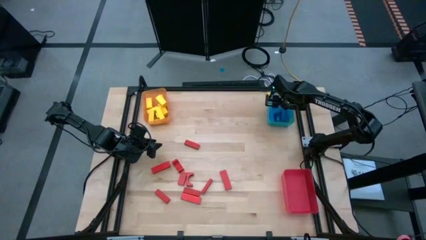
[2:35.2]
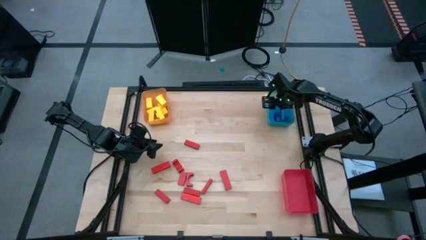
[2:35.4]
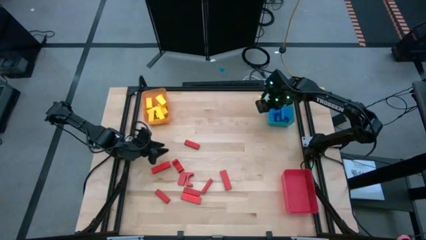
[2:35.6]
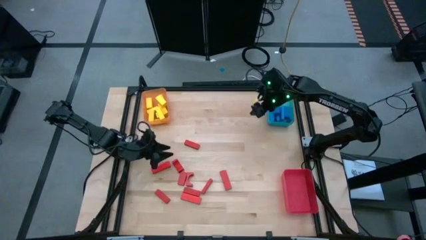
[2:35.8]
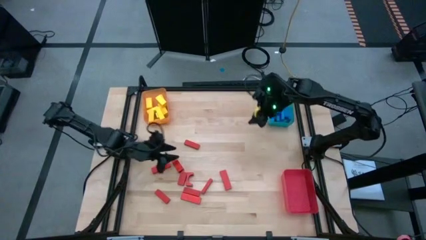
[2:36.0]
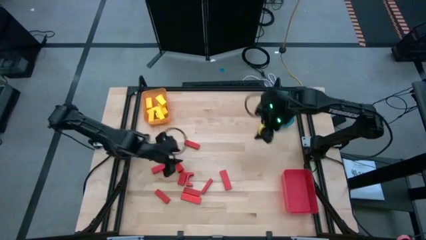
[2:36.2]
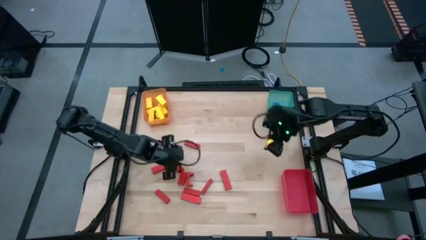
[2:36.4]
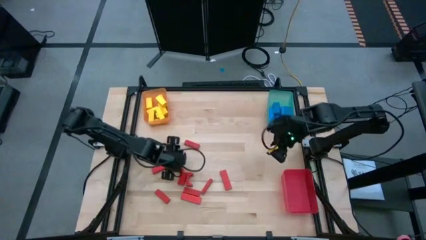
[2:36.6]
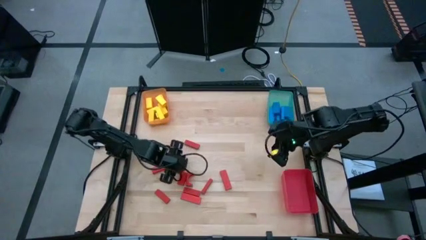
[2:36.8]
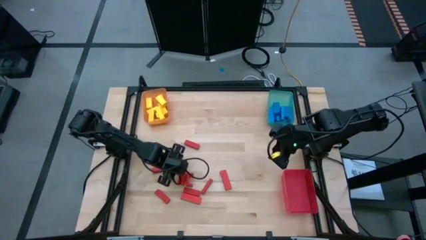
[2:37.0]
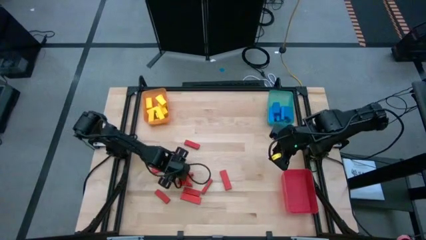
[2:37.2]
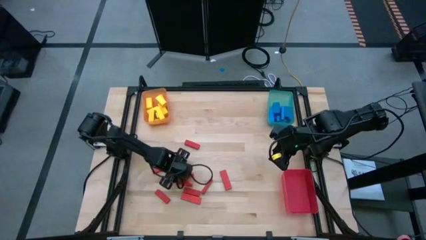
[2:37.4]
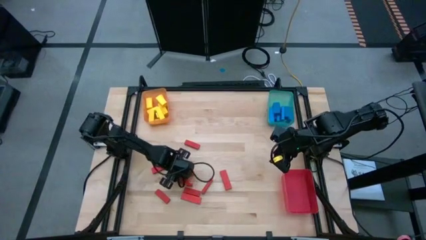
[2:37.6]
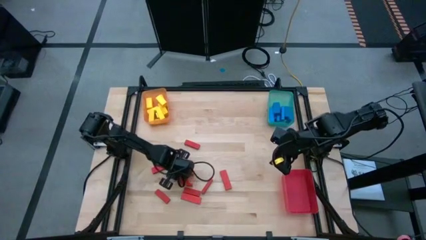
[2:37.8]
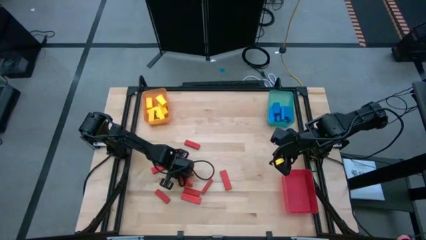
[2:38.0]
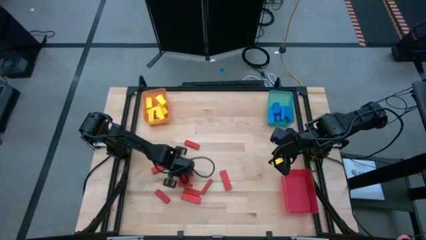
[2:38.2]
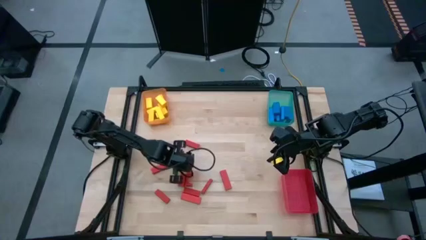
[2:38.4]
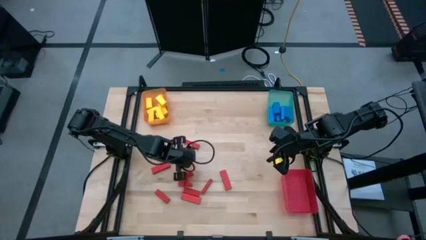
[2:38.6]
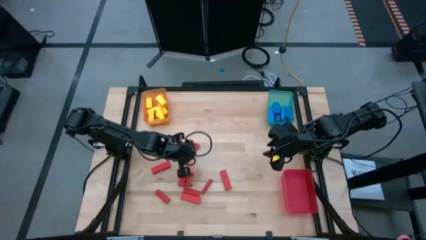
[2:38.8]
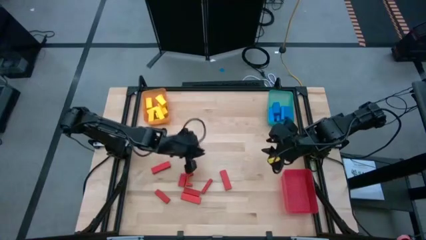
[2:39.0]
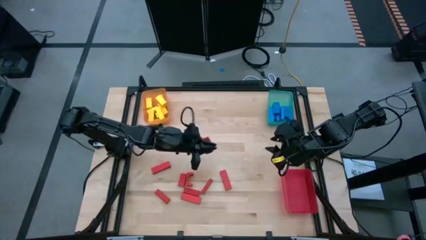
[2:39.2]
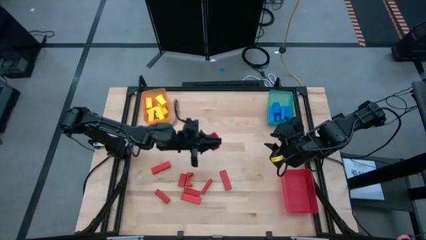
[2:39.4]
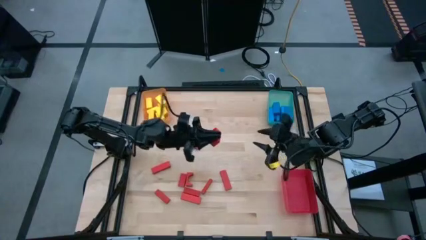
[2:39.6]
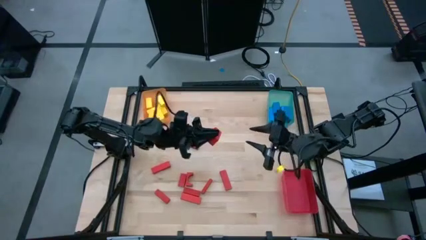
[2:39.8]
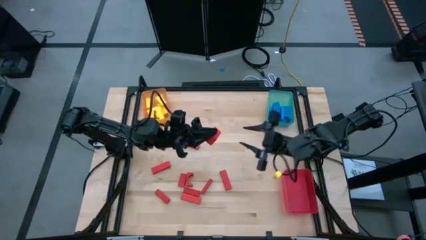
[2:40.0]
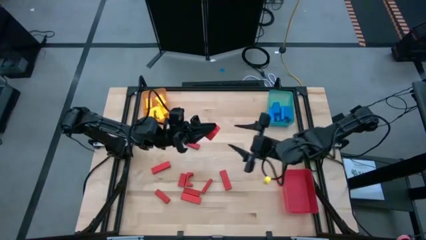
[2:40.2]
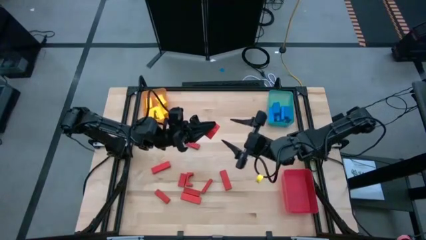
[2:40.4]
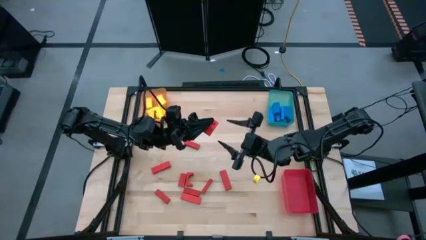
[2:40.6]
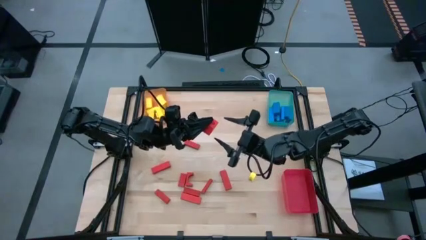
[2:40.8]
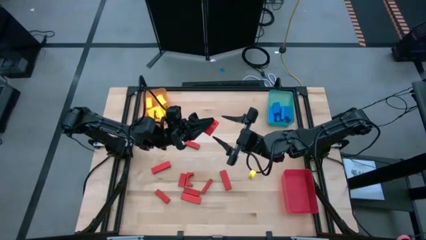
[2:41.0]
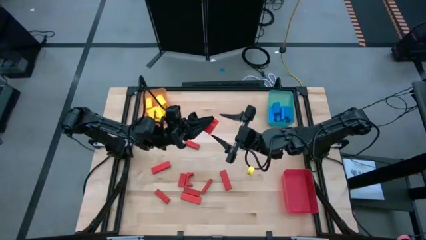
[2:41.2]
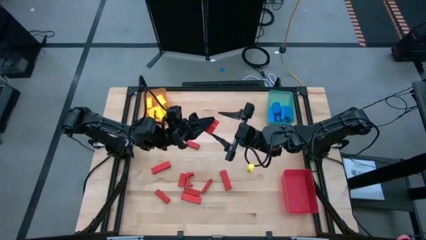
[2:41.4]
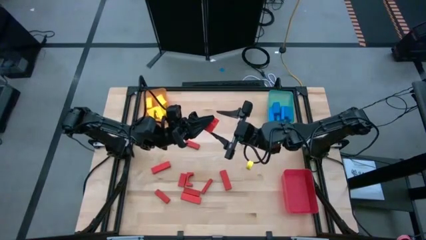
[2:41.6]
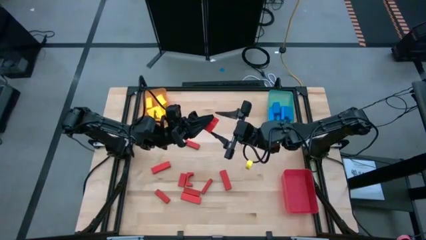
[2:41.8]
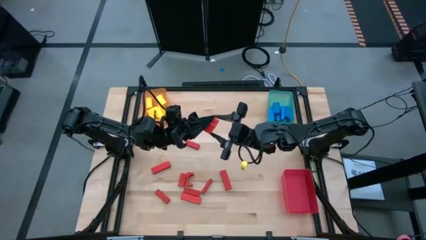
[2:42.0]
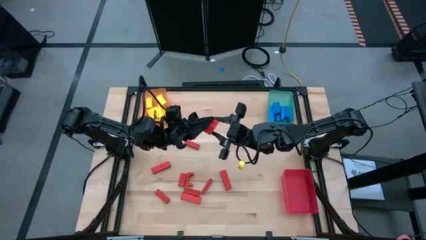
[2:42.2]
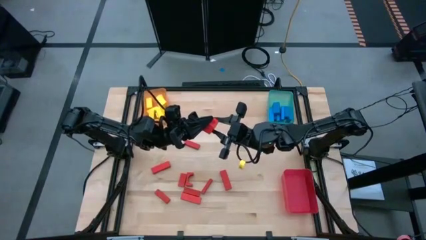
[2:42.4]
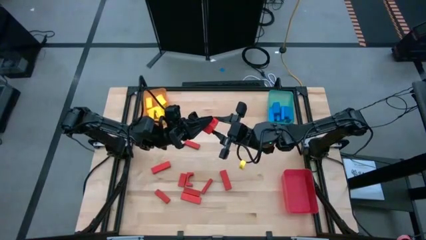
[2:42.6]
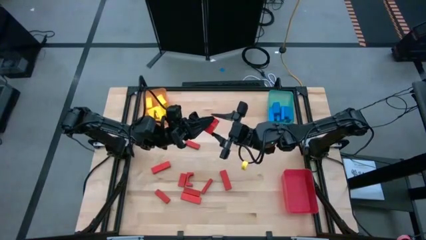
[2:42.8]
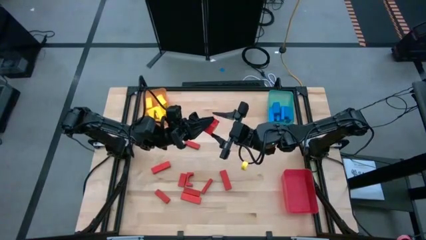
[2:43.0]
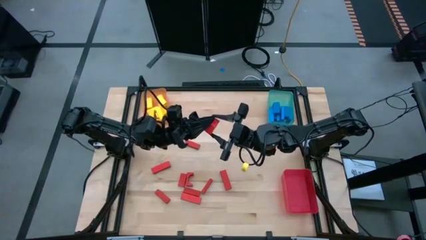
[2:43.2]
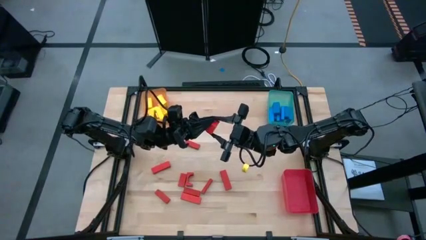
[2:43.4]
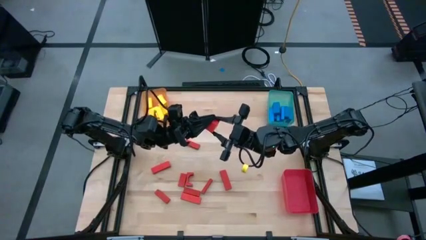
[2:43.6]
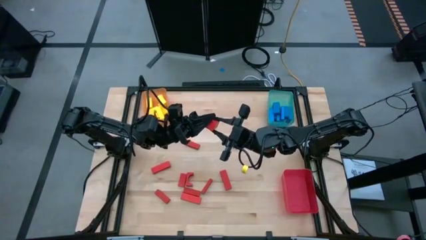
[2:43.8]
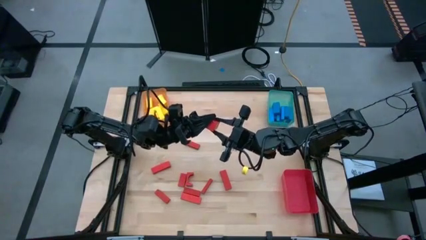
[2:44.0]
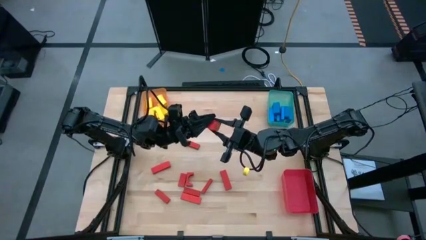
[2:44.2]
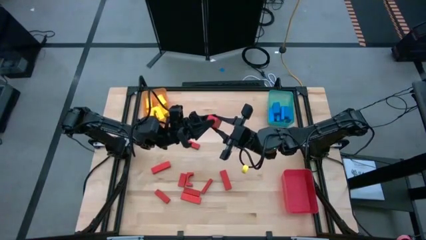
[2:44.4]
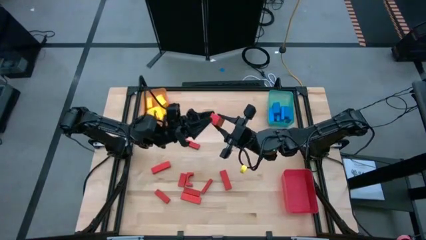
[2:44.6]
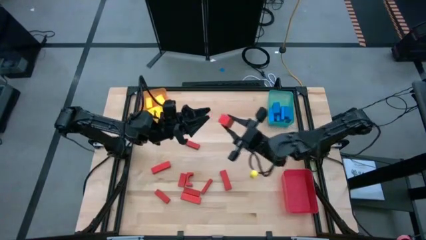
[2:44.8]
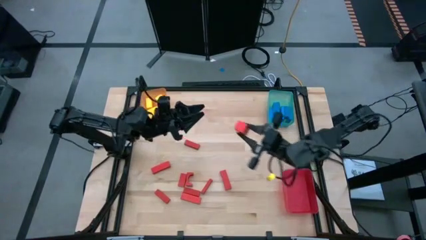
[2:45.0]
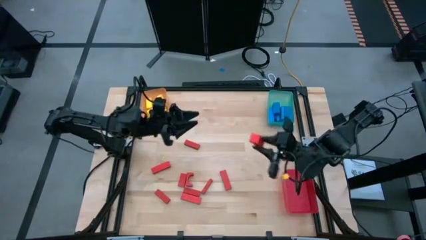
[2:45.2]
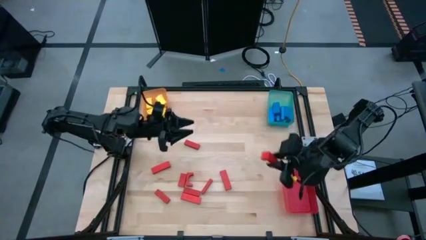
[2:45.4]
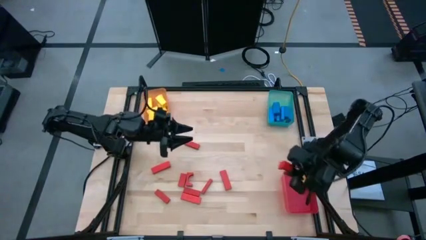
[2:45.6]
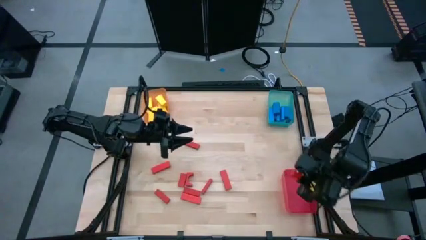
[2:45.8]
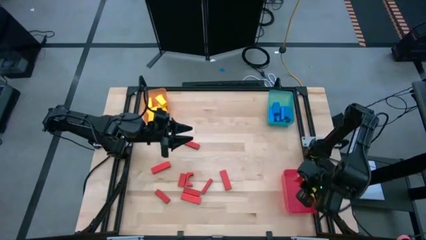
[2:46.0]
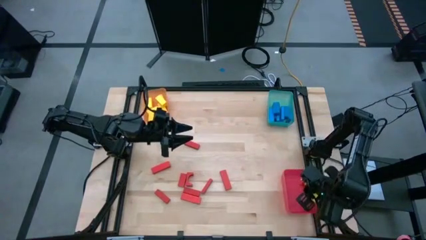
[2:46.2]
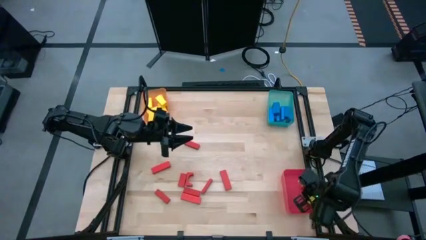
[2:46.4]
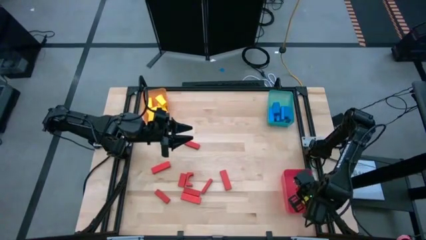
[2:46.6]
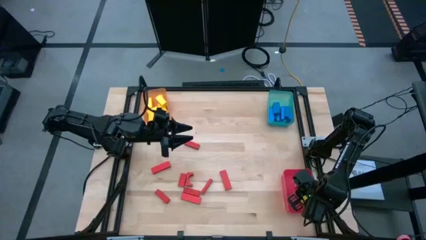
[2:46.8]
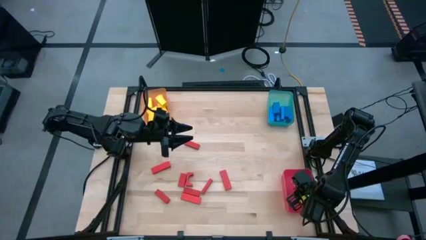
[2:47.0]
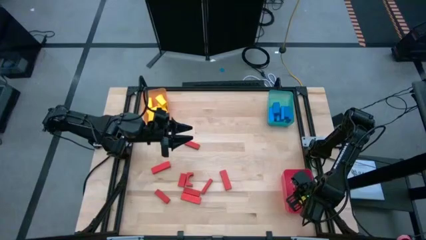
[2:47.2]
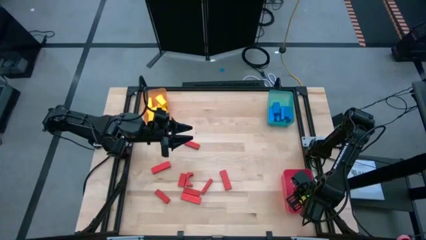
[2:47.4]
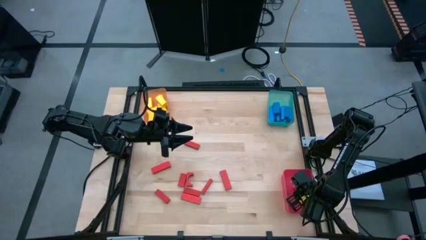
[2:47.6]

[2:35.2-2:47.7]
Task: Sort blocks
Put the red block into the red bin

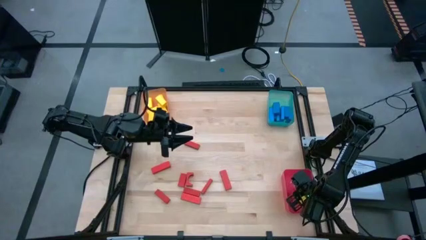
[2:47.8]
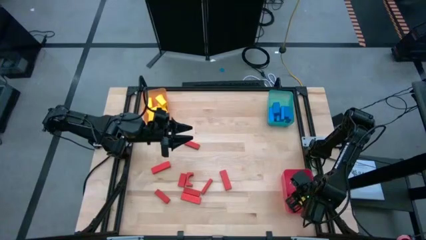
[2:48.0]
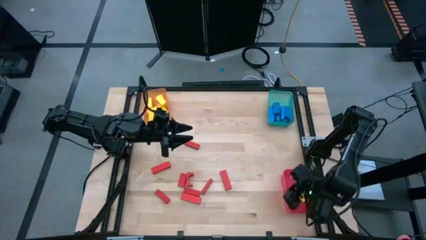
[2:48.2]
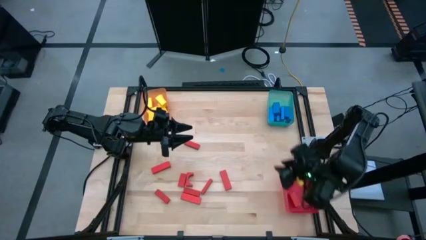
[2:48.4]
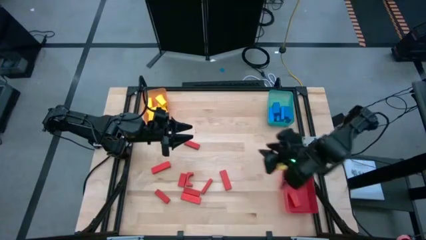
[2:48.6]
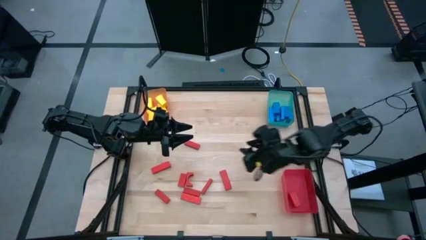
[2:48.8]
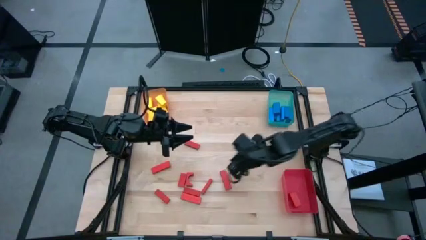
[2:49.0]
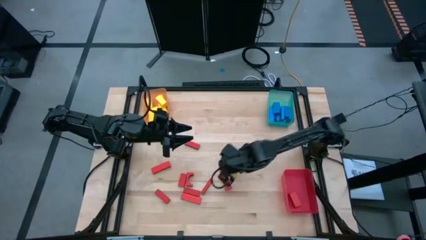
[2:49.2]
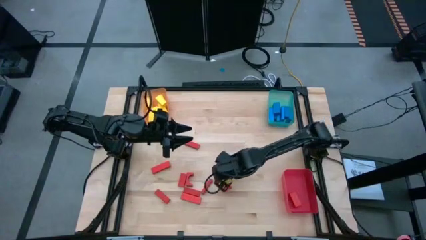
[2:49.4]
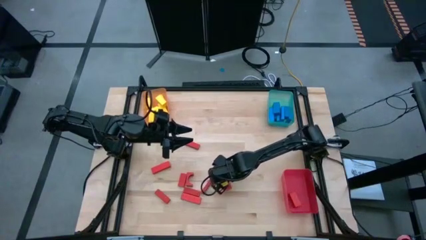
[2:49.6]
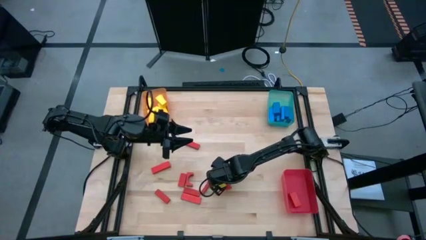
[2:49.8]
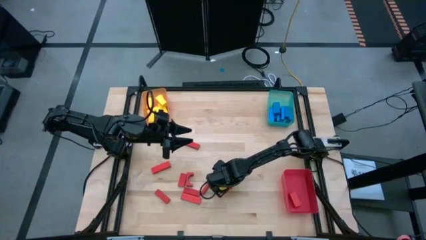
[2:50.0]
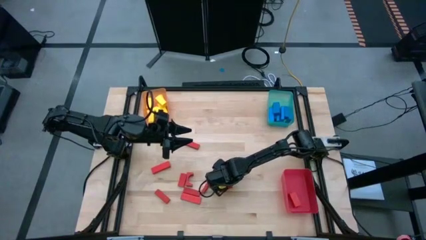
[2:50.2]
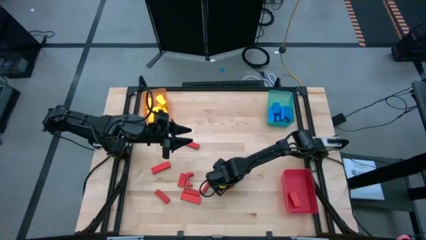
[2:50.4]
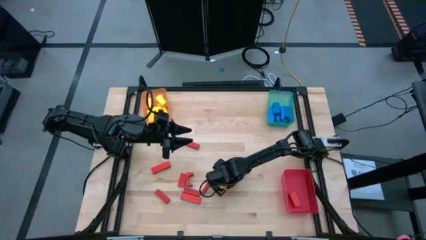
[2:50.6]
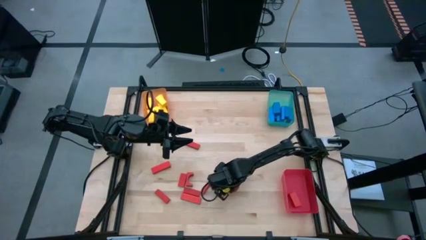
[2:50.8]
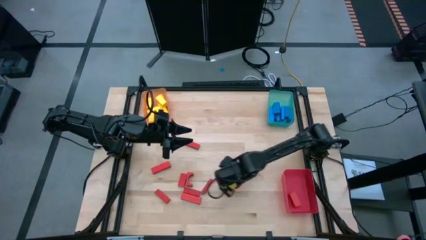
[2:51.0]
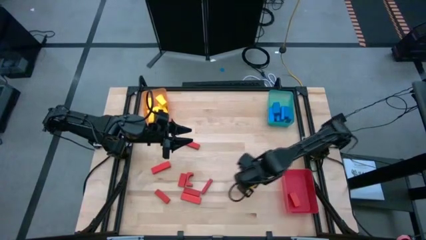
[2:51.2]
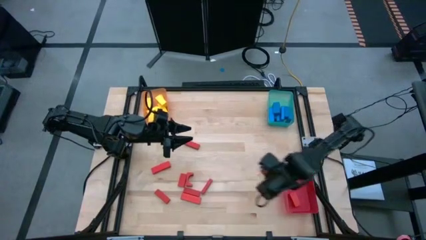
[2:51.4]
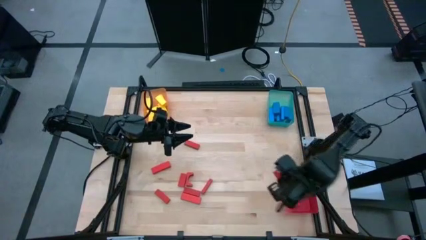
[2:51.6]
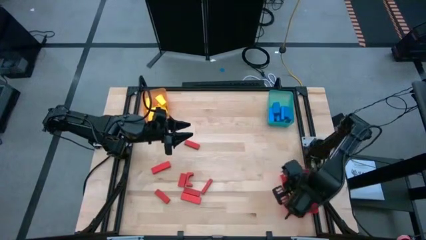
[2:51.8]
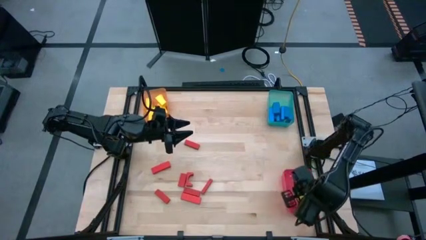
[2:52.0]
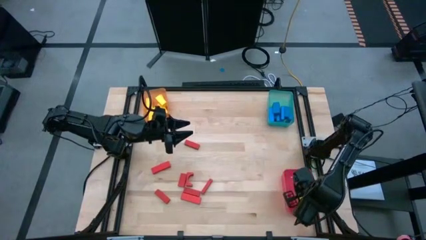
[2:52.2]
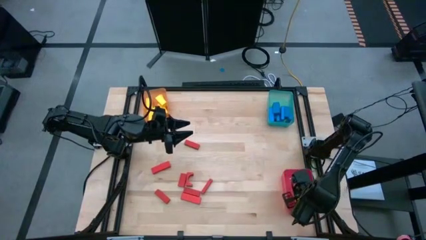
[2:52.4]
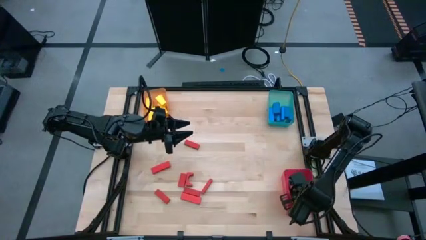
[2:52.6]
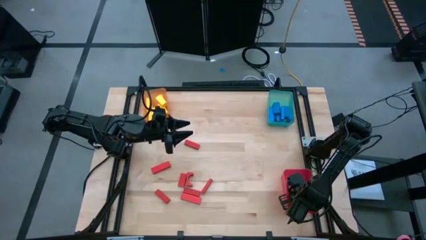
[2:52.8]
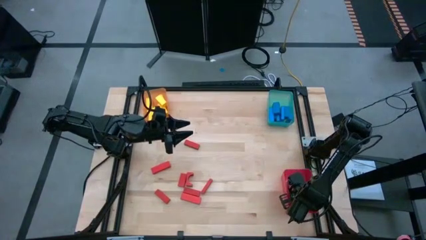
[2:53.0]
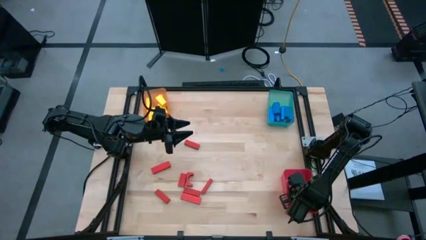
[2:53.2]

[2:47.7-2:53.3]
Put the red block into the red bin
